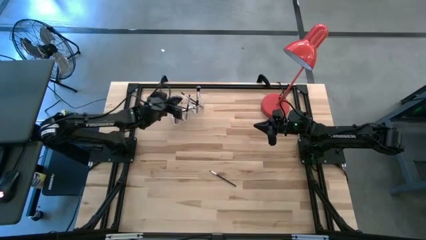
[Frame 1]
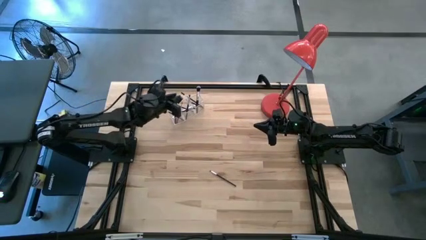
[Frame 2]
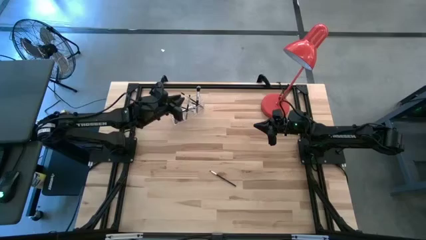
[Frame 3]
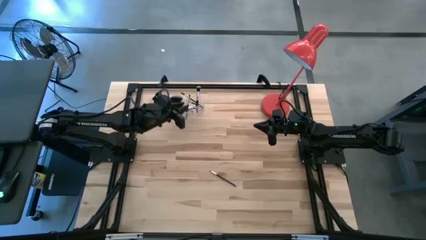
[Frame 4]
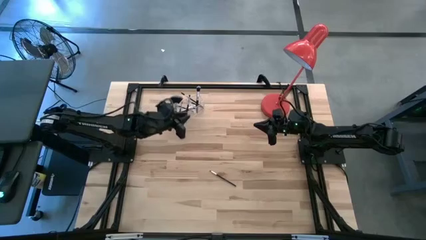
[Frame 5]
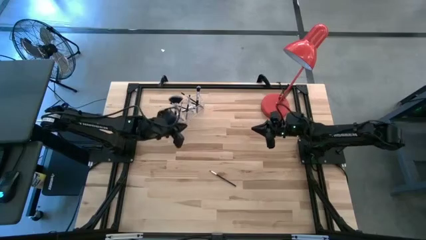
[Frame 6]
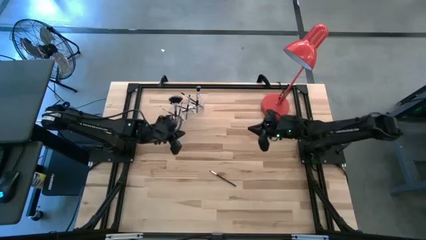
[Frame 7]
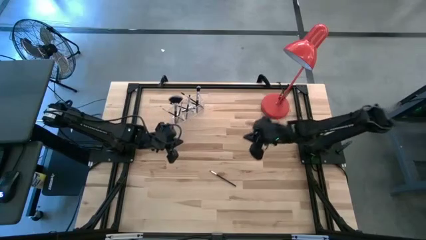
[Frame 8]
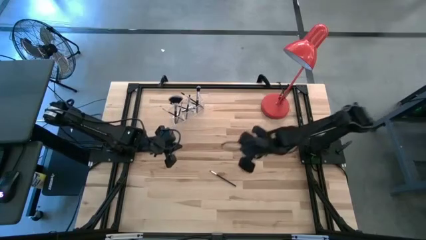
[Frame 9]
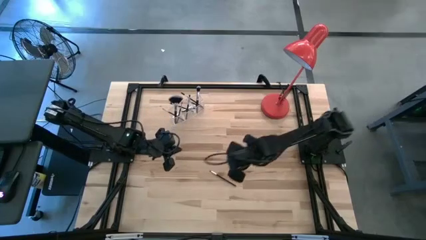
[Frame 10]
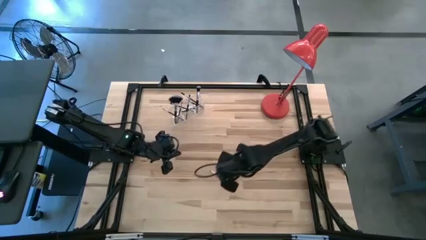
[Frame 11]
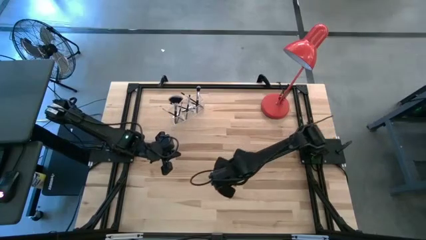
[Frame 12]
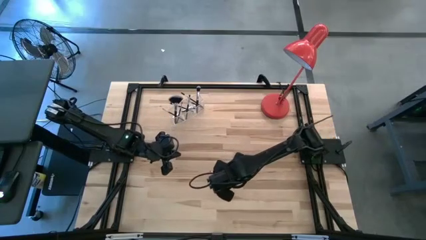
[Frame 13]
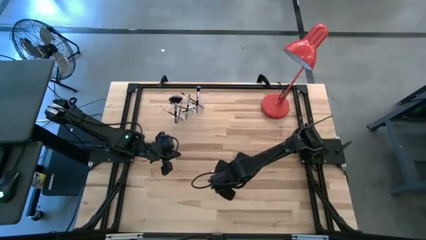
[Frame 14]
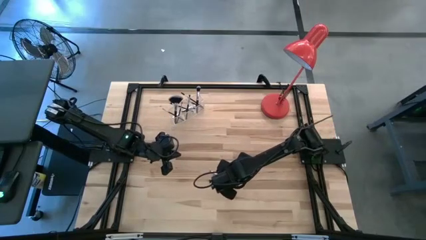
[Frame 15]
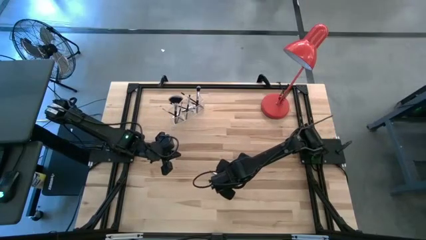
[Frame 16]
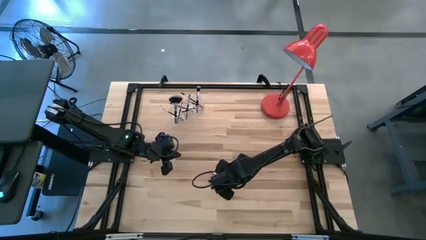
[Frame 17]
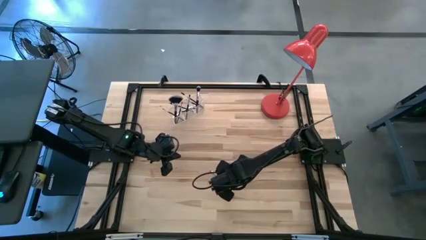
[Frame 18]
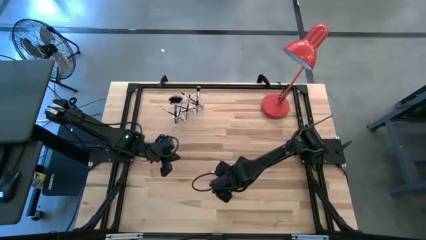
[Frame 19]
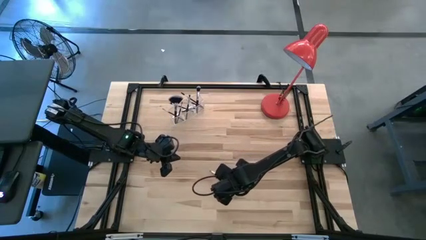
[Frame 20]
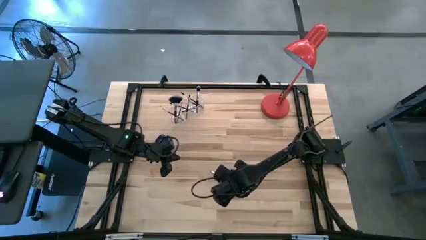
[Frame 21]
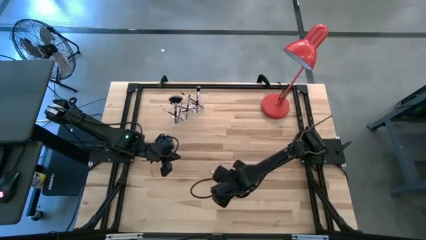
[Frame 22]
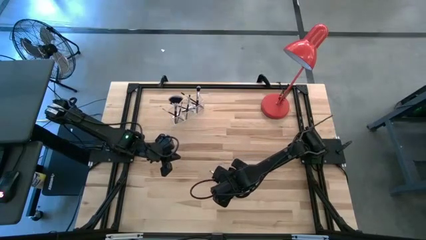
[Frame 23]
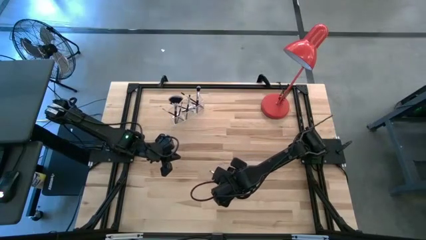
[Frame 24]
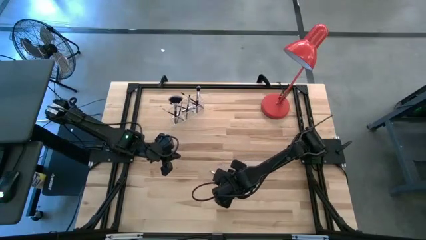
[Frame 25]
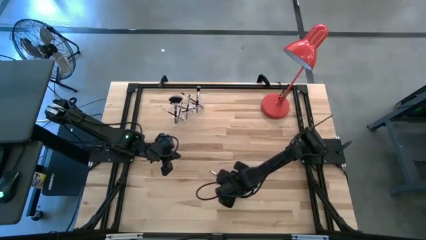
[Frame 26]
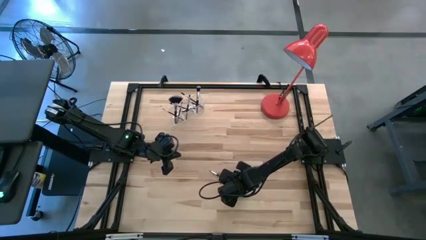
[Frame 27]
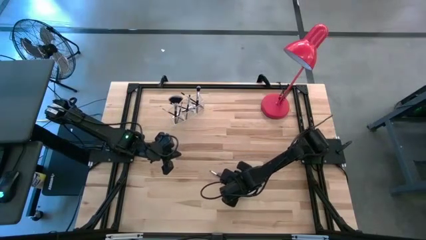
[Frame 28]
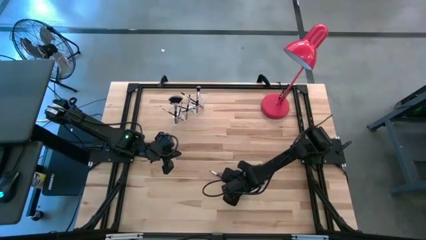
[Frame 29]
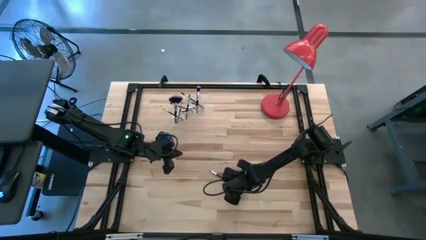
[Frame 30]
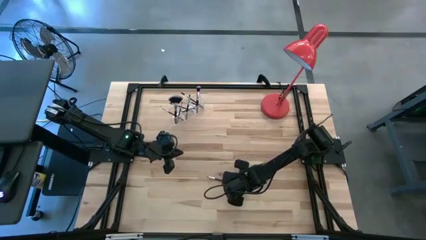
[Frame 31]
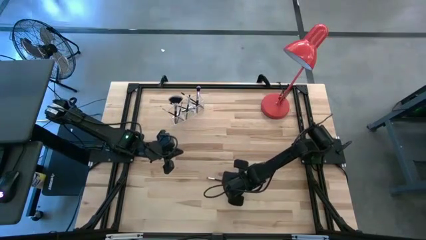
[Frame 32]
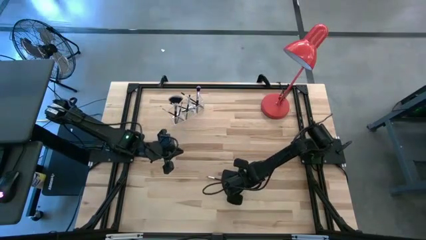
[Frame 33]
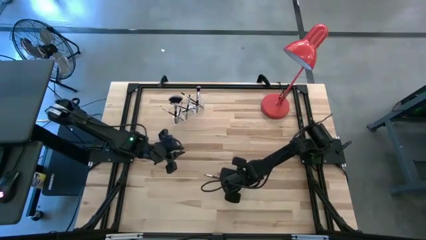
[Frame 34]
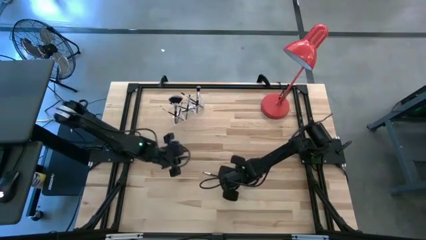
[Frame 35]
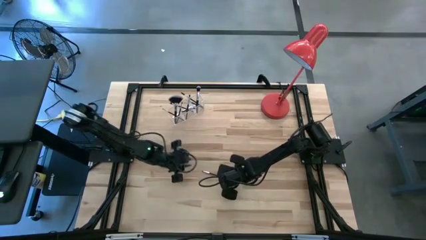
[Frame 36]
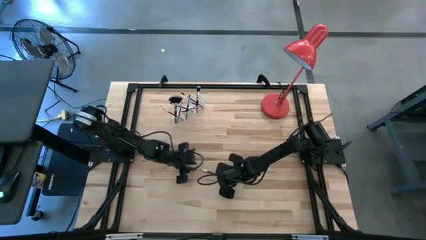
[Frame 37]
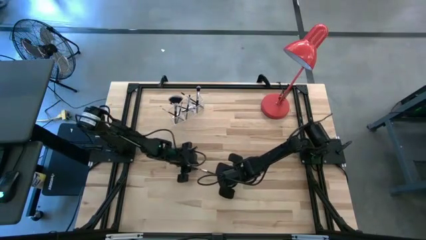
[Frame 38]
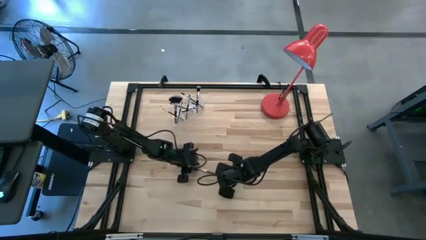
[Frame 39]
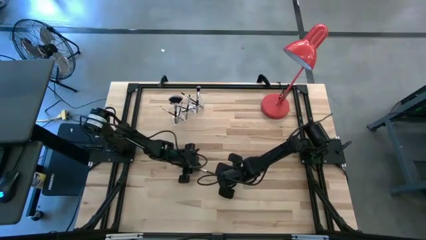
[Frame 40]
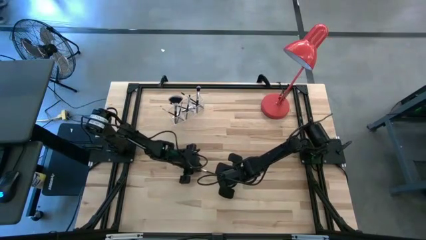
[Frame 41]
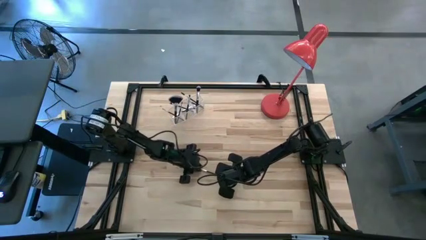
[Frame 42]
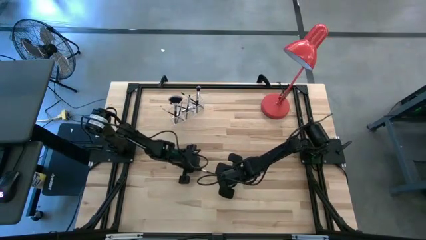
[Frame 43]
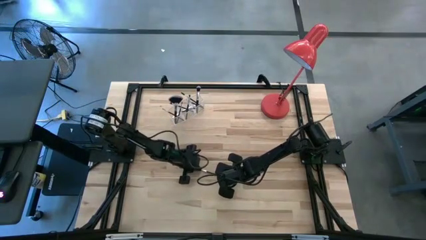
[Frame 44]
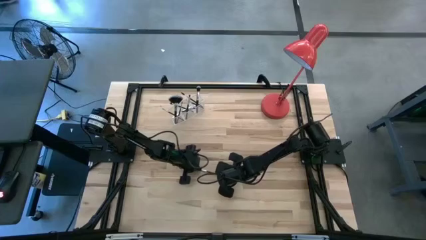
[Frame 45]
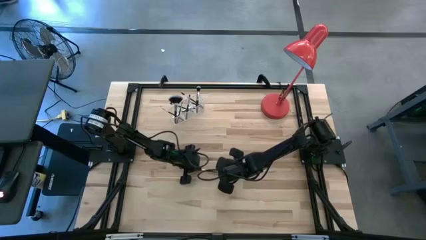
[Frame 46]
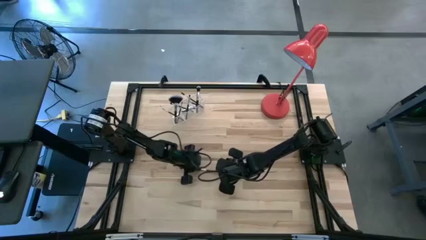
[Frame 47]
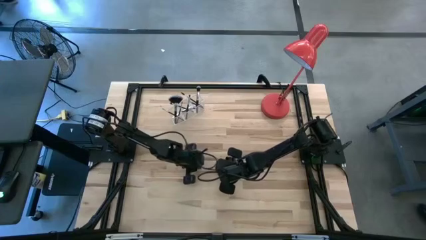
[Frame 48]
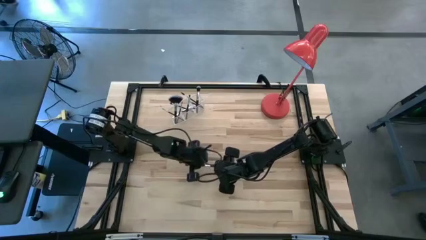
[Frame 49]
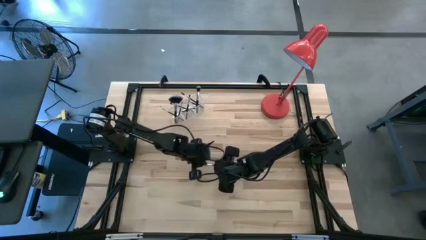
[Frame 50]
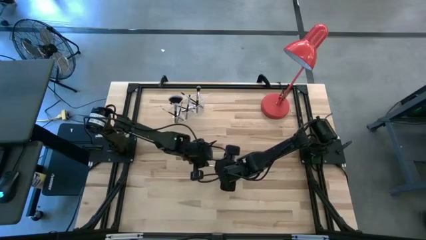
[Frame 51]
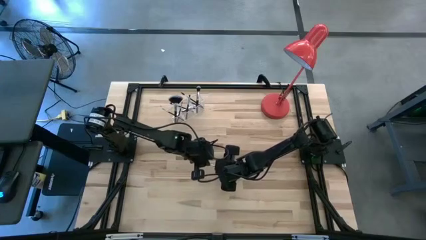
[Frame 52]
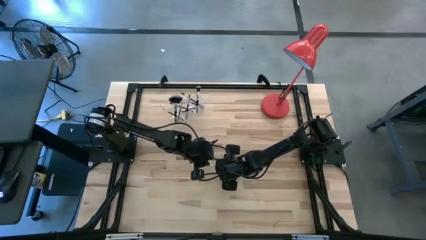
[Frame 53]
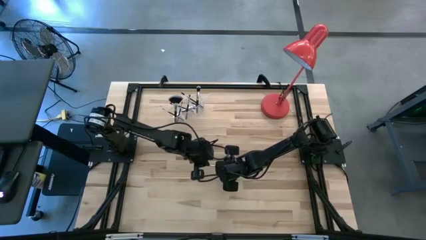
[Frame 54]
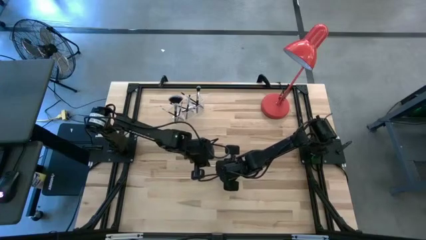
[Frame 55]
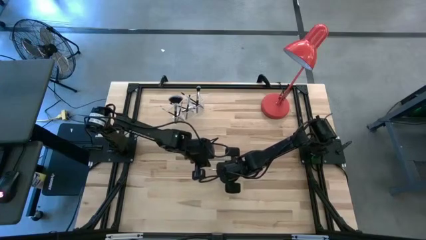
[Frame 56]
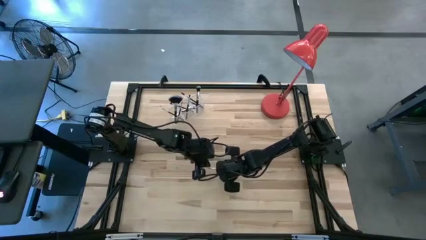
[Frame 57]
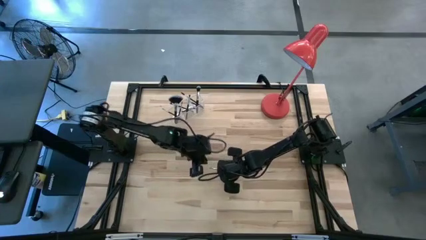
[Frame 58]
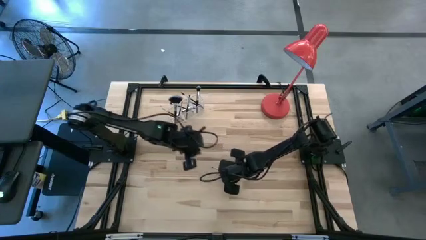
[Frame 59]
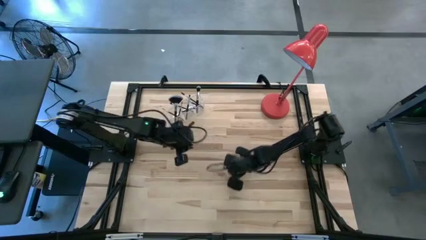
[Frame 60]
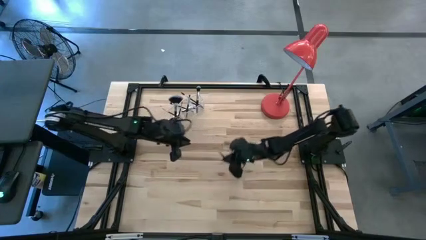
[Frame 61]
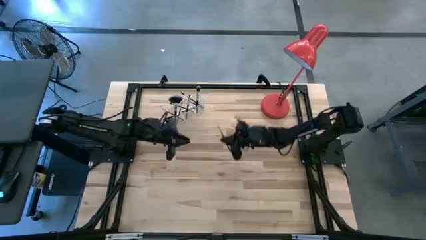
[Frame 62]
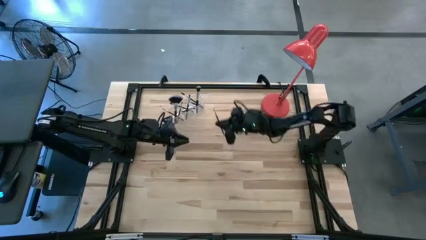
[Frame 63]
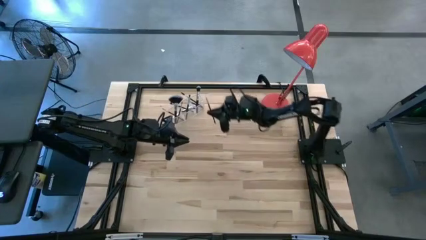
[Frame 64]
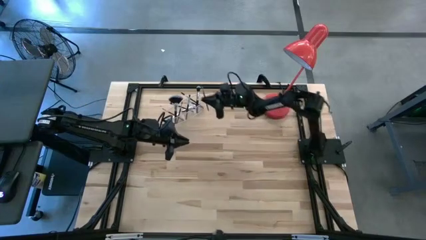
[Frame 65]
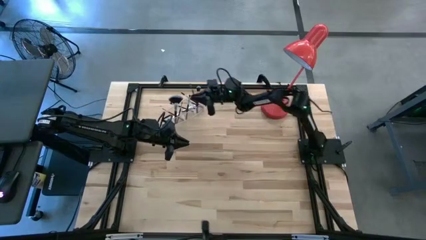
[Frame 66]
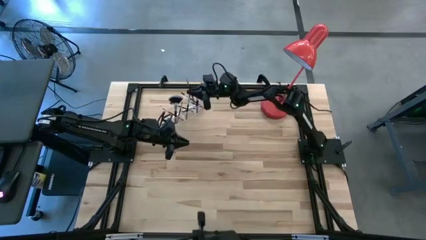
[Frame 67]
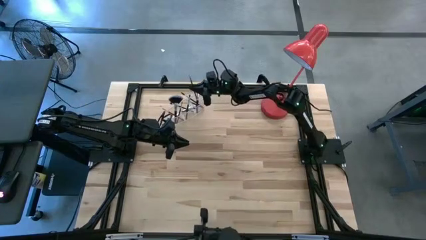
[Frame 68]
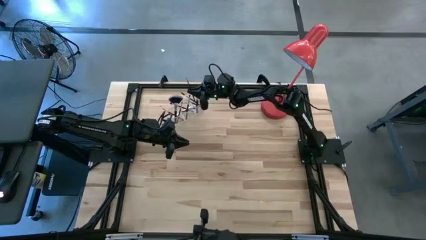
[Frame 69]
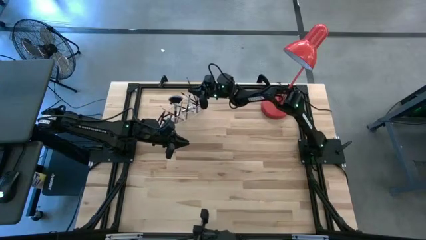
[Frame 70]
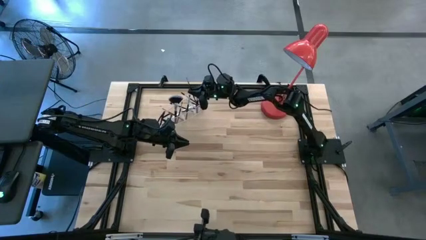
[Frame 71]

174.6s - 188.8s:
Task: Put items in baskets/containers
Put the eyeshadow brush into the transparent organizer

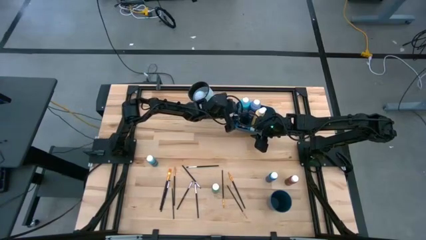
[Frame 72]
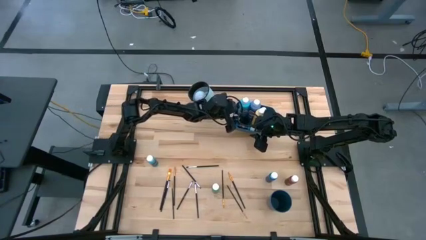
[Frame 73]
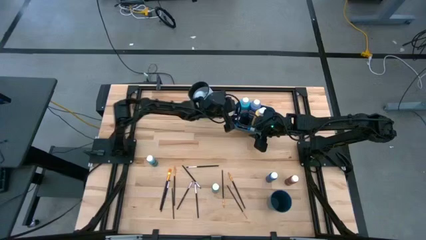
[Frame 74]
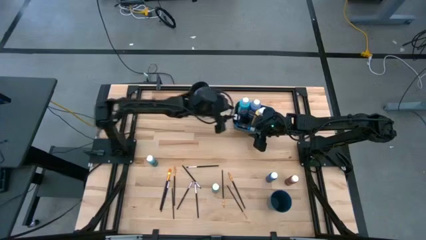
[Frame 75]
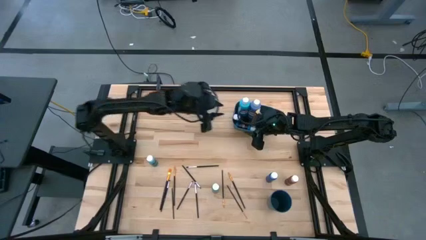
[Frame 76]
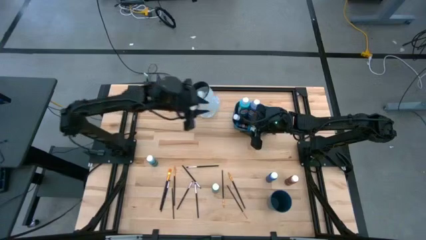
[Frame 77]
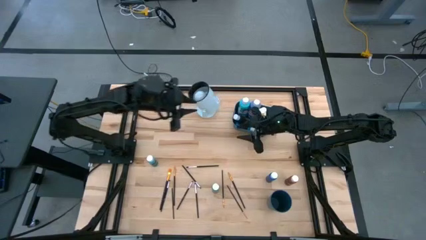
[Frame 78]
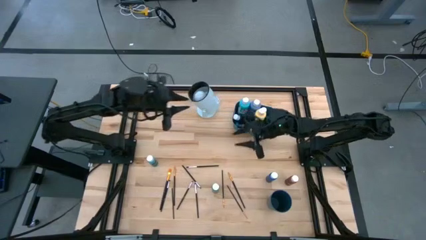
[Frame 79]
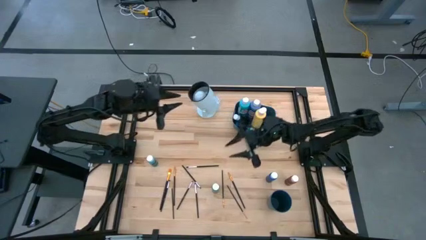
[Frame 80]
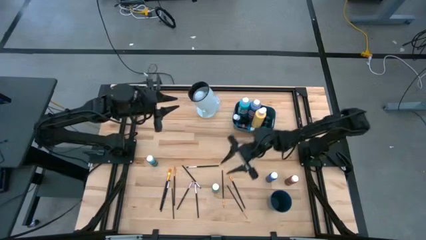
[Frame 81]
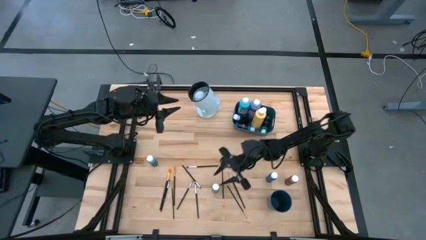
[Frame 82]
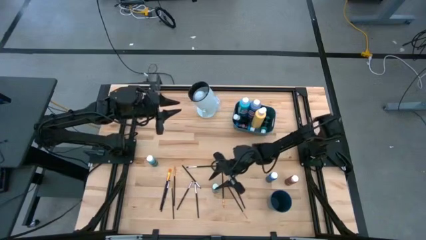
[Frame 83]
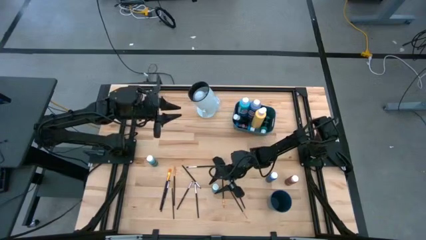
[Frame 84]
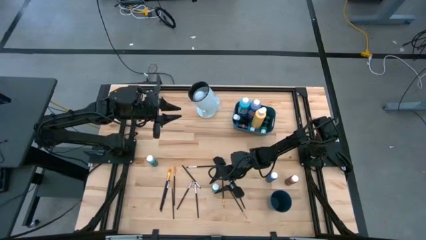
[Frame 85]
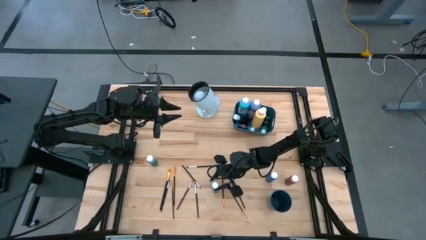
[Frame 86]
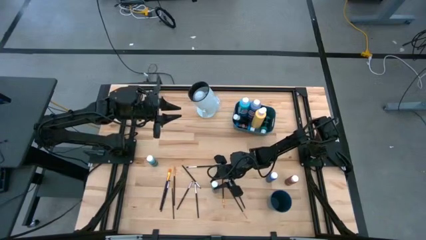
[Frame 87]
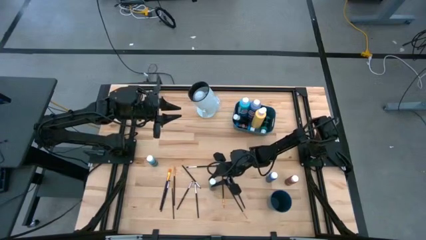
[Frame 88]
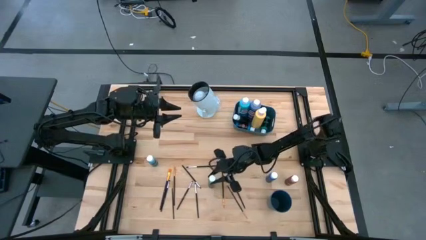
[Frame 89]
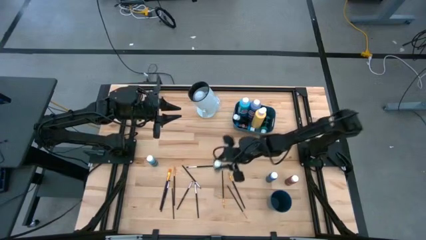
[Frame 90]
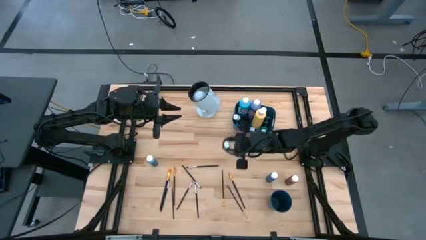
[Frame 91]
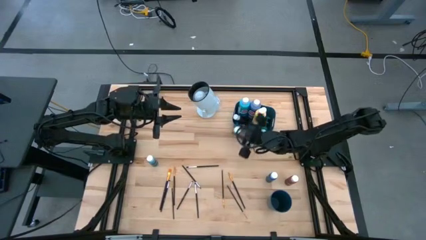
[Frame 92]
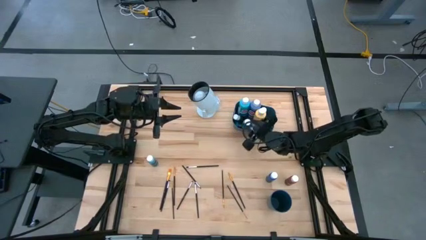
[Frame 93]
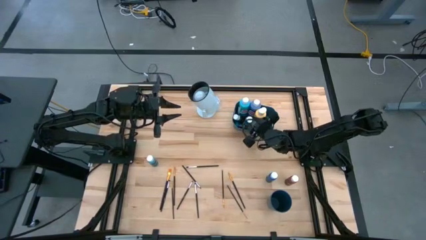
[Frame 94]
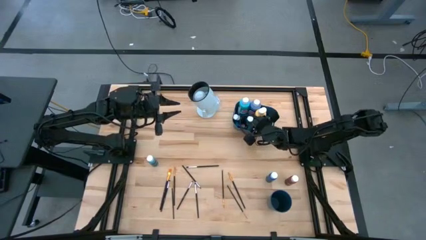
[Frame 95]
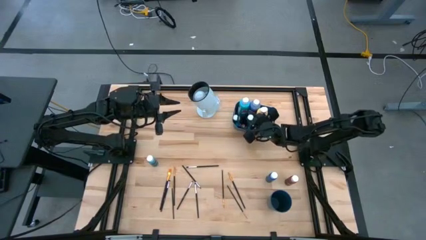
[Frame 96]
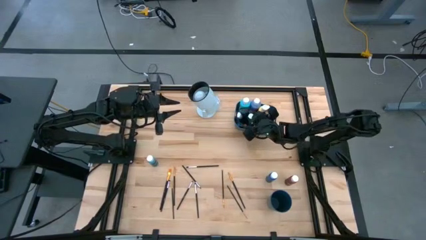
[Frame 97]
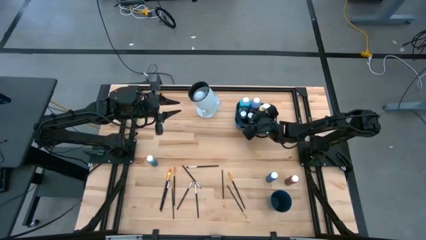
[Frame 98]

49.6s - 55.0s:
Task: Pick & Place Paint Supplies
Put the green paint bottle into the blue bin
